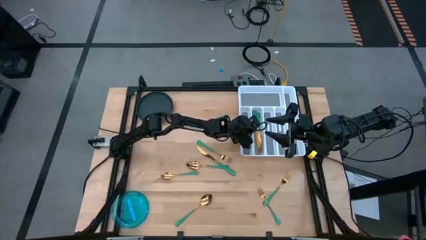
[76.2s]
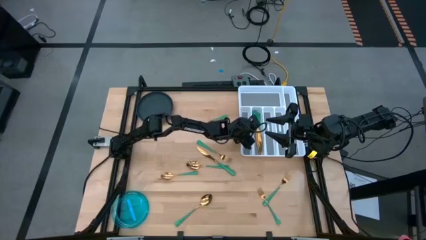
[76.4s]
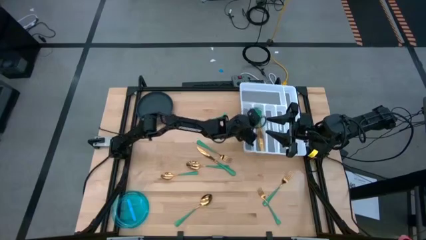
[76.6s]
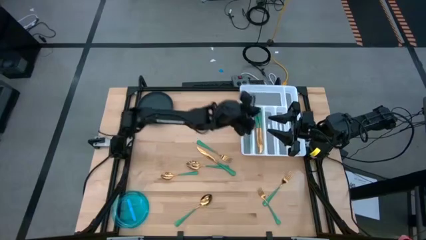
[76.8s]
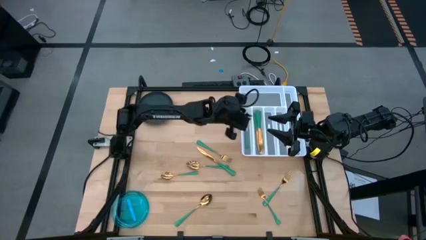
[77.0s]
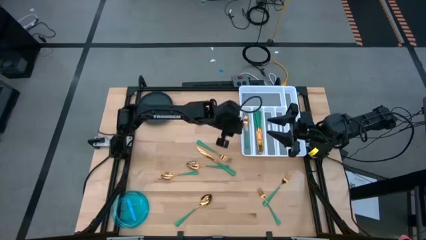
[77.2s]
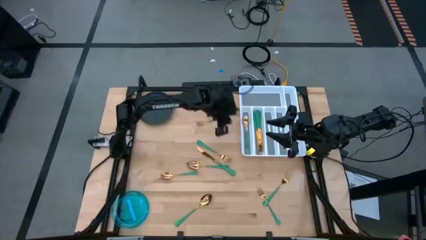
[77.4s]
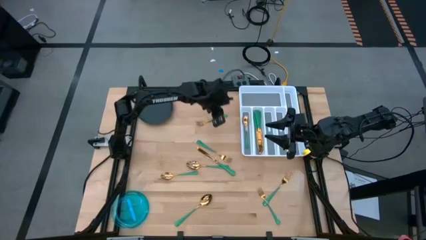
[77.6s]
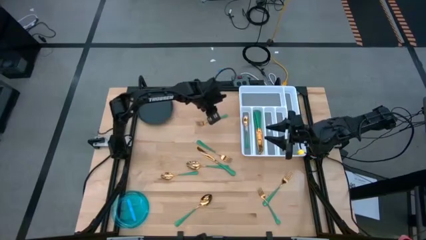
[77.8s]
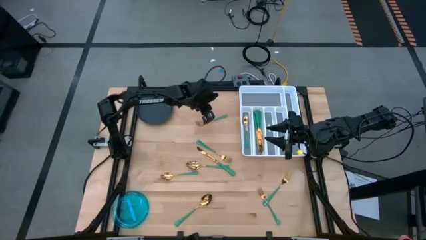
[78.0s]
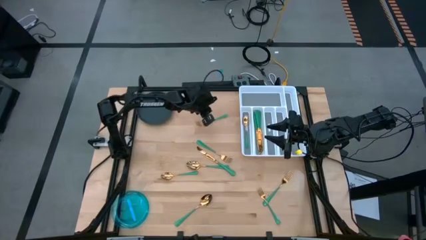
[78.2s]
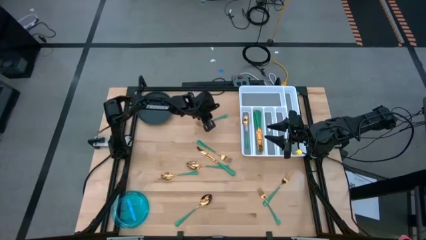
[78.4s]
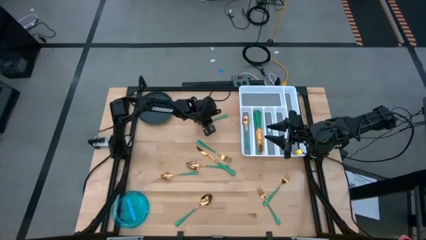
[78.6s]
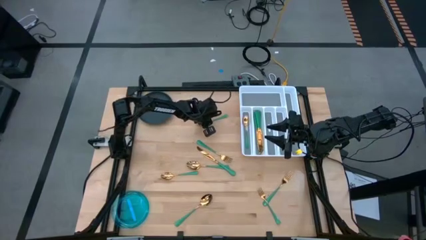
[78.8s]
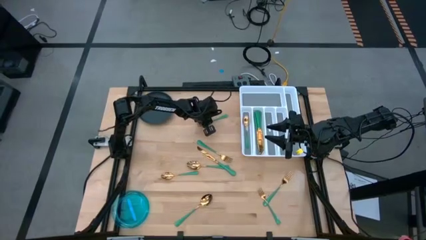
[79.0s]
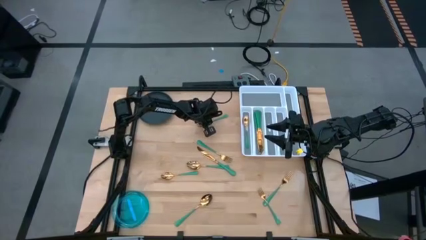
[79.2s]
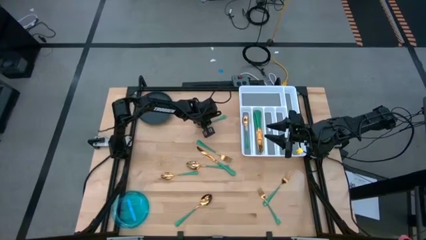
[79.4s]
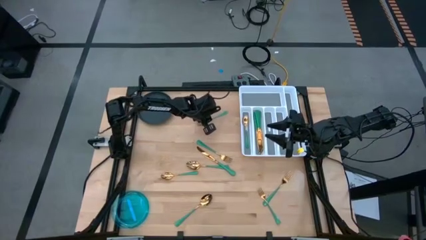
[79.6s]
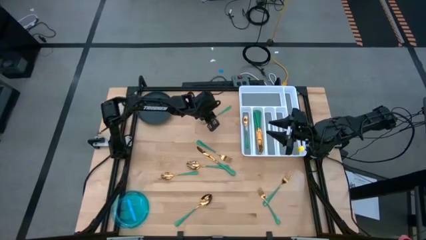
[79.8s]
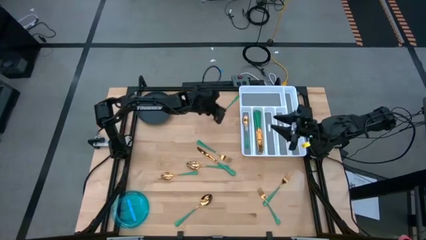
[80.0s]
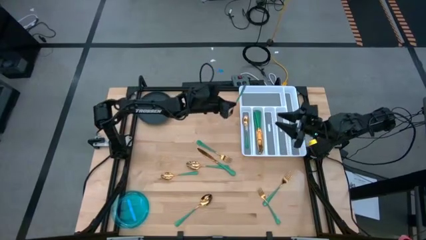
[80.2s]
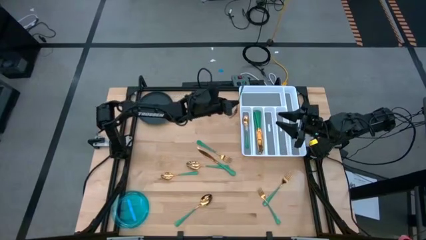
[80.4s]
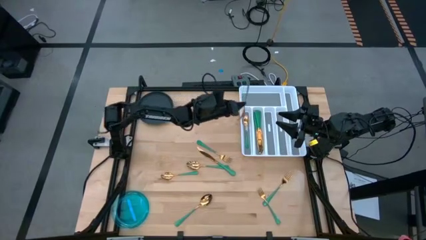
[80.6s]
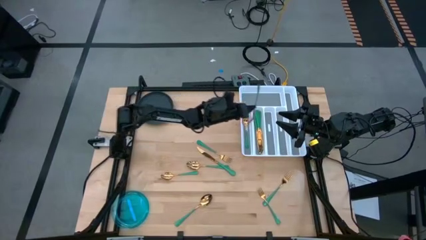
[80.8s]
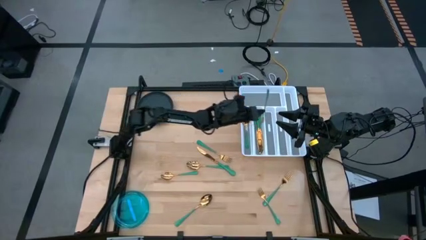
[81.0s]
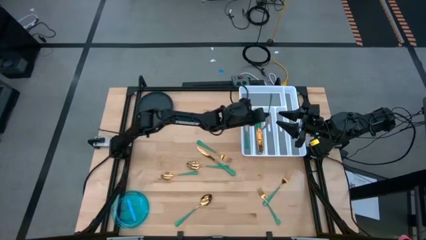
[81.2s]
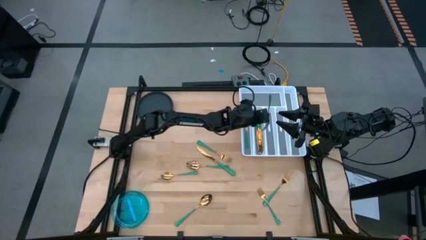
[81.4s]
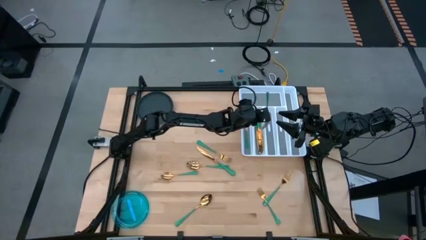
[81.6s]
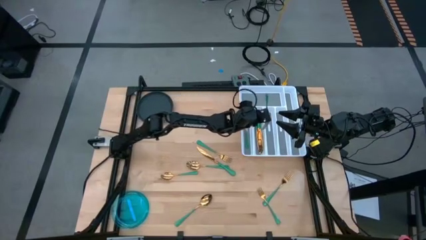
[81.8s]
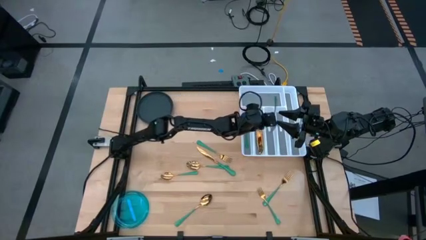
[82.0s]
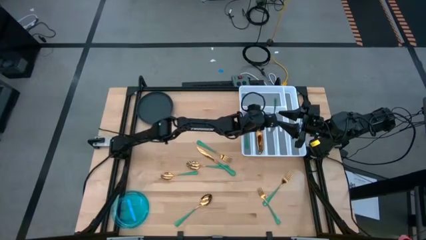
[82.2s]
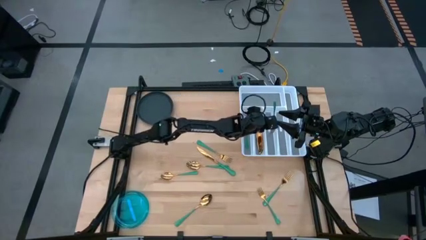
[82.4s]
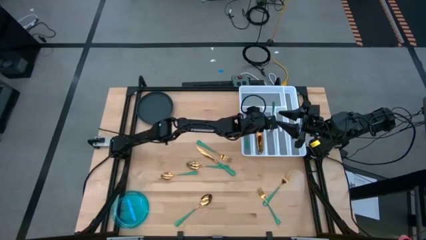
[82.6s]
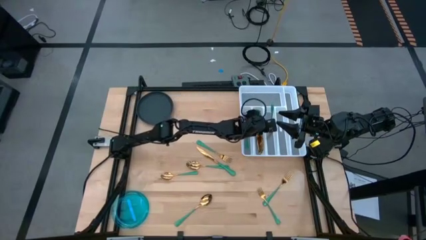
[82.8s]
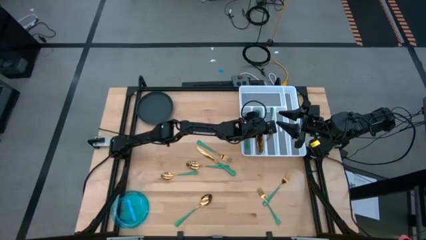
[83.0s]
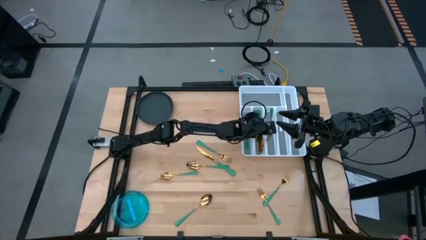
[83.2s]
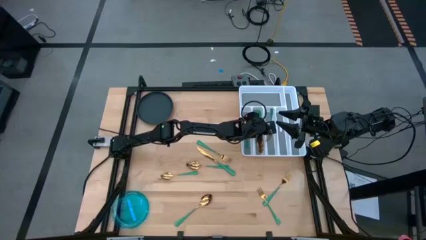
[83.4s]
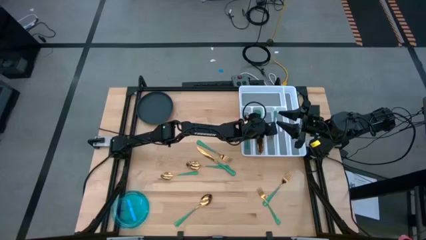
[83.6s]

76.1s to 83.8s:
Task: Sort silverware
Put the green fork into the silverware tray

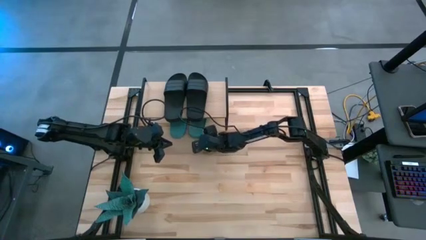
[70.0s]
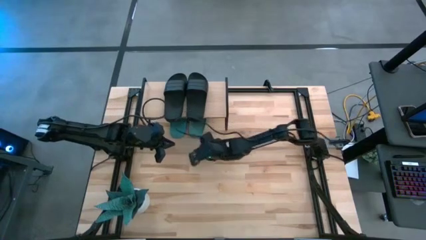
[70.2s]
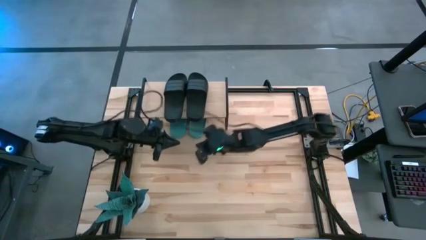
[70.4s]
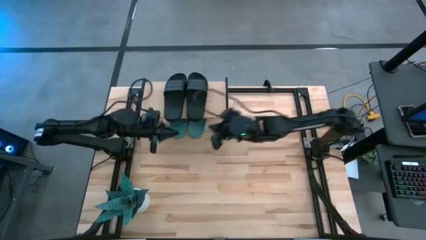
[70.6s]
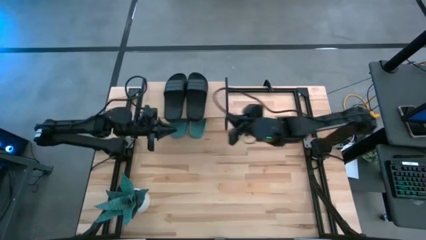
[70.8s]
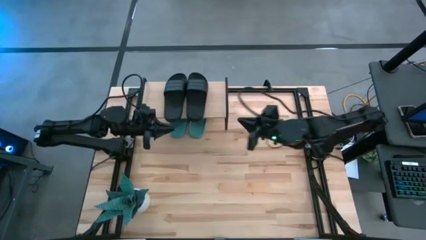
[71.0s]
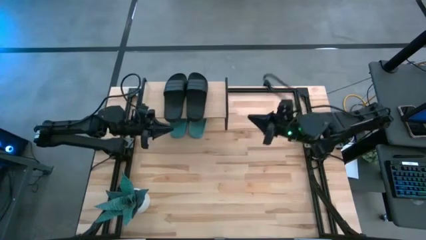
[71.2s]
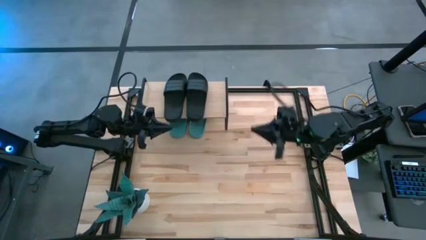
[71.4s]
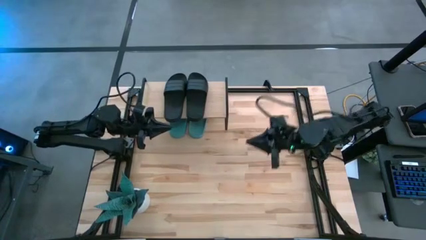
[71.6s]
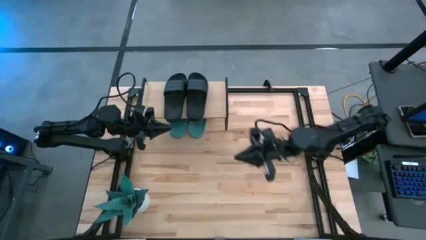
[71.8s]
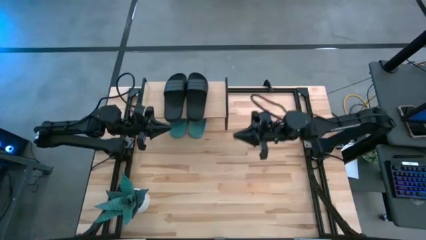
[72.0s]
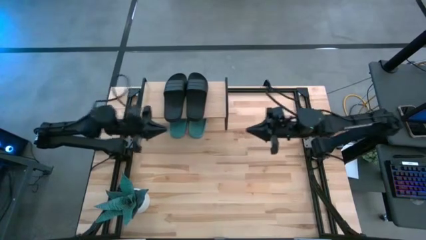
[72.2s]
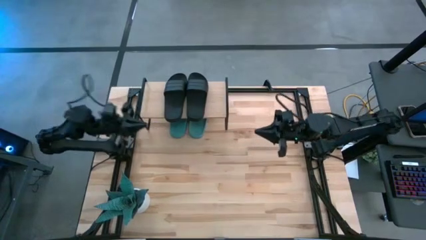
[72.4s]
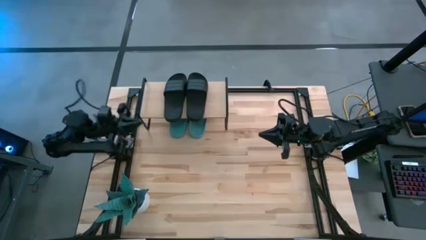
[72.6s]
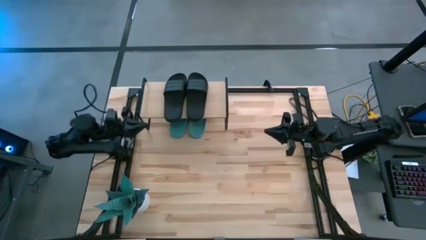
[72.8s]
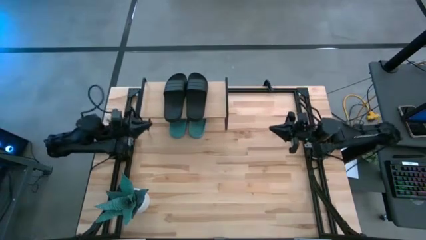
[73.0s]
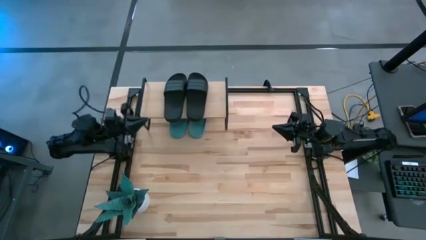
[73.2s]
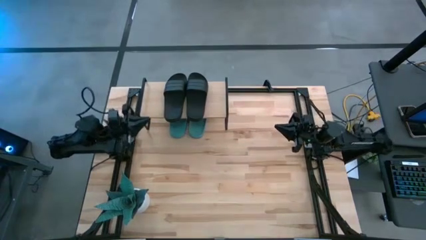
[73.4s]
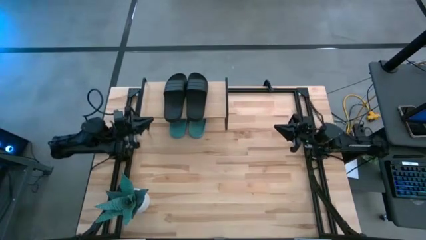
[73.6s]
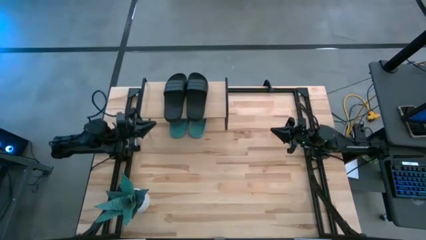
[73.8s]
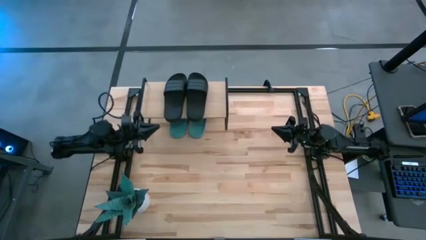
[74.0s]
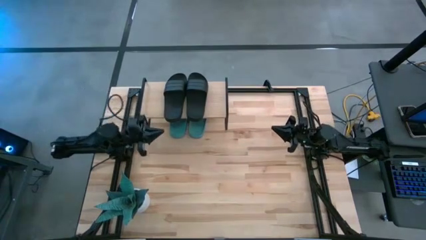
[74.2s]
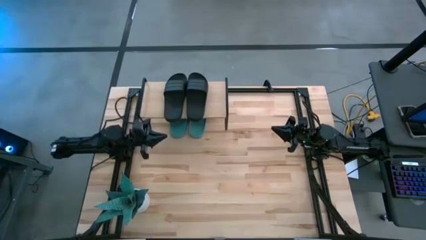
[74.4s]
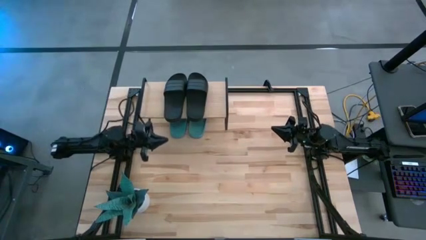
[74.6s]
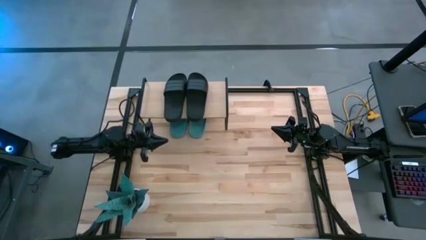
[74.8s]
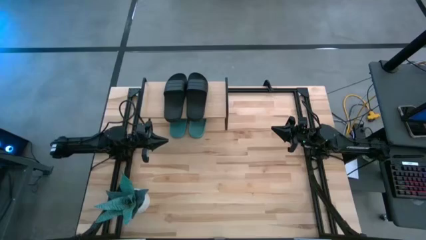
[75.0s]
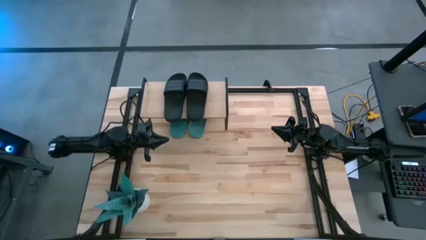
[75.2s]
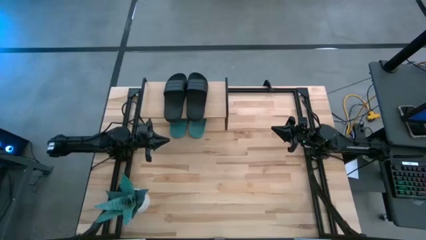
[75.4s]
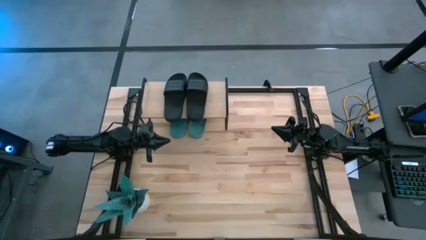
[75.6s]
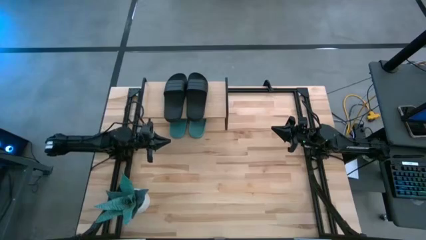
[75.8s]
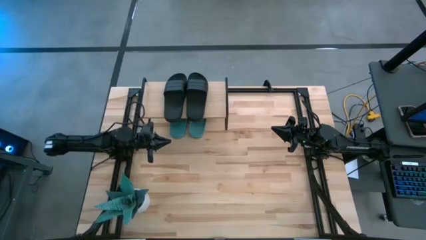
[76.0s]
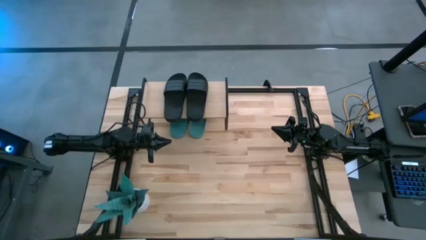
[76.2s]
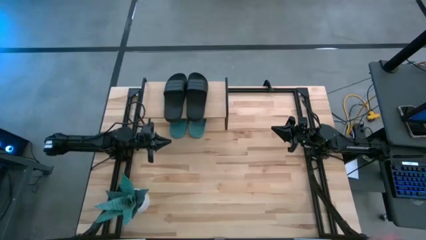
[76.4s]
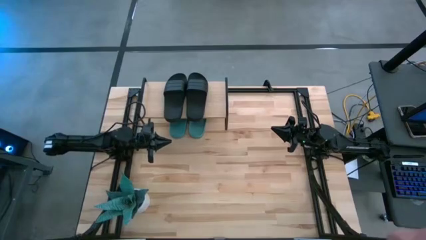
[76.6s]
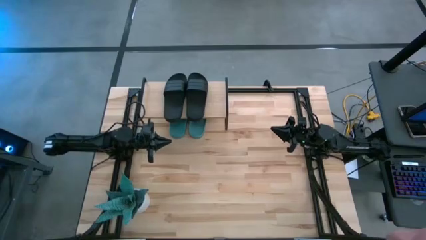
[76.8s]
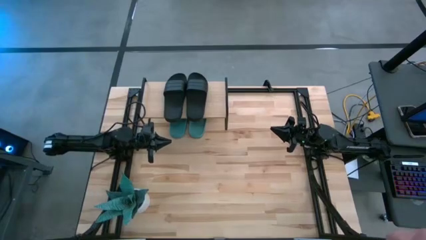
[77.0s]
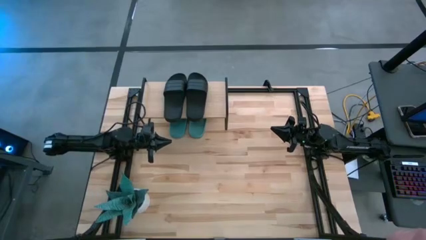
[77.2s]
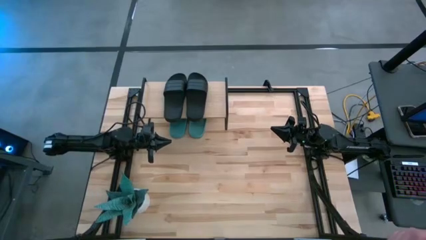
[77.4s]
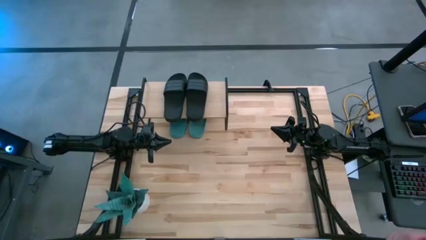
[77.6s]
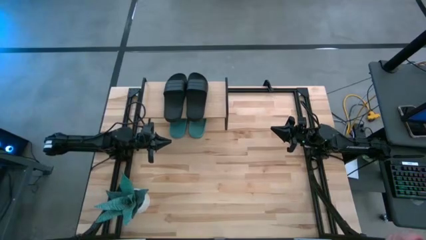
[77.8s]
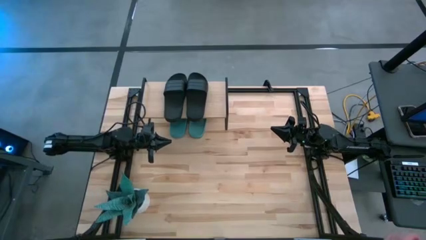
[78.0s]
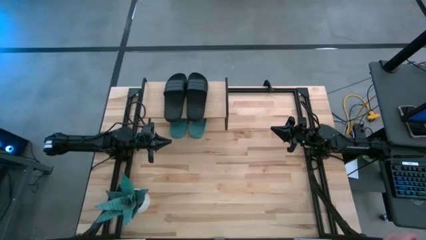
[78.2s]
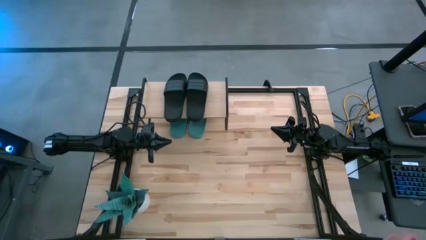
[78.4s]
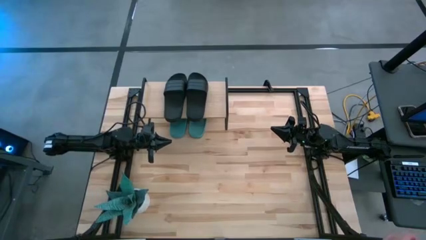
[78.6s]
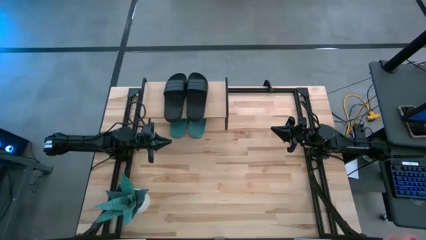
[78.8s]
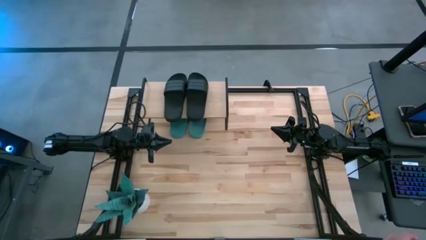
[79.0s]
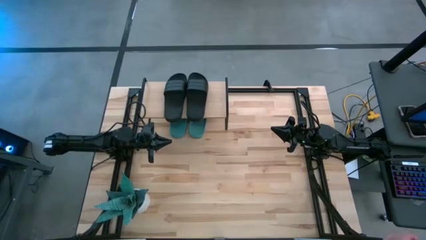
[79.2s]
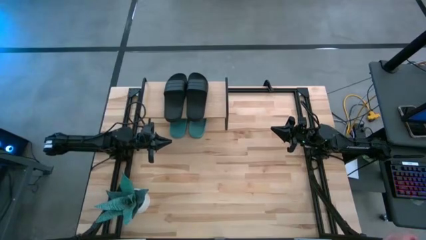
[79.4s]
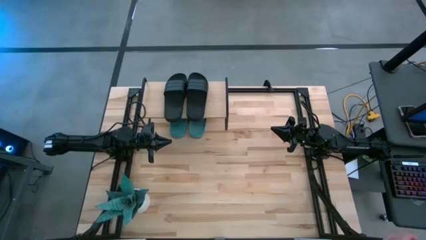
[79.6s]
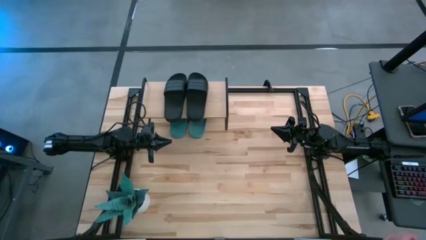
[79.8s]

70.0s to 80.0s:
Task: Pick and place slides into the shelf
Return to Home Position
